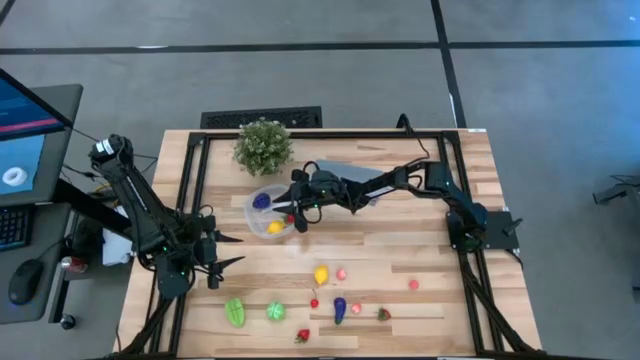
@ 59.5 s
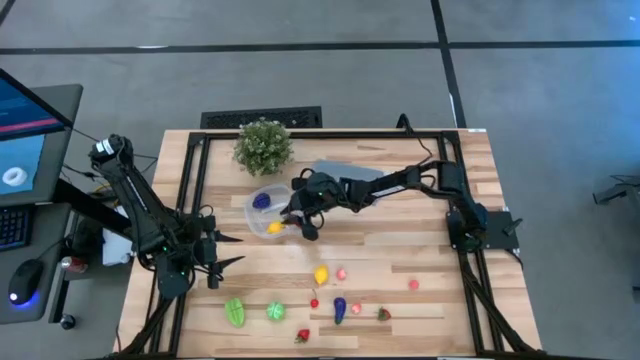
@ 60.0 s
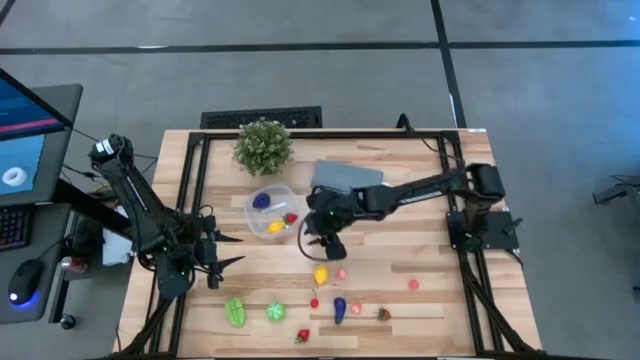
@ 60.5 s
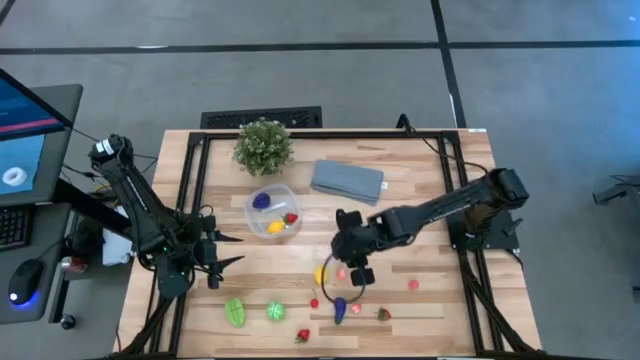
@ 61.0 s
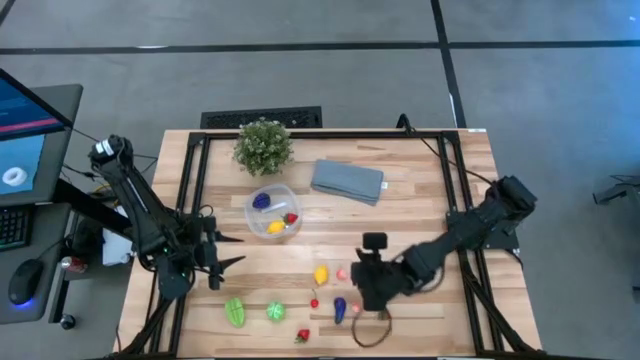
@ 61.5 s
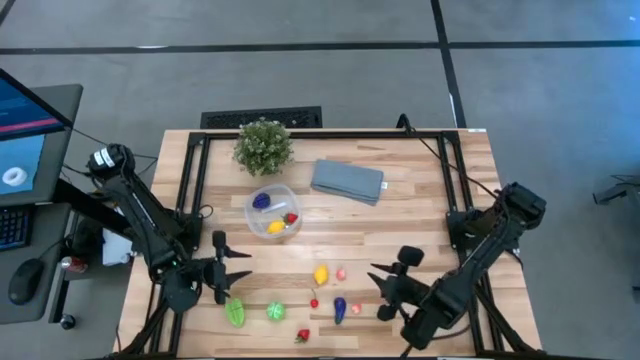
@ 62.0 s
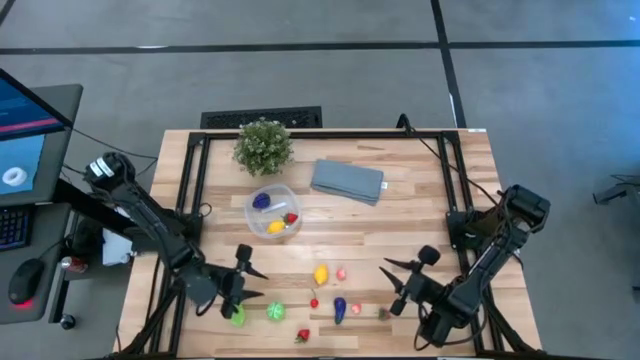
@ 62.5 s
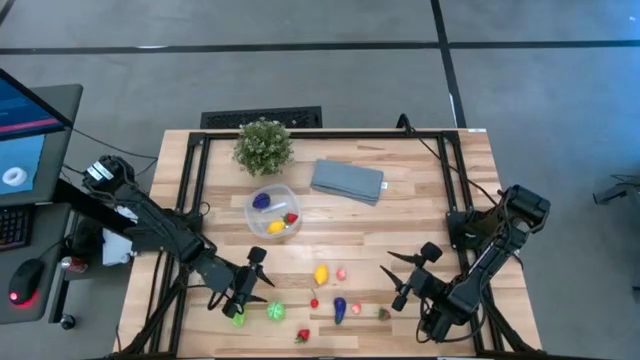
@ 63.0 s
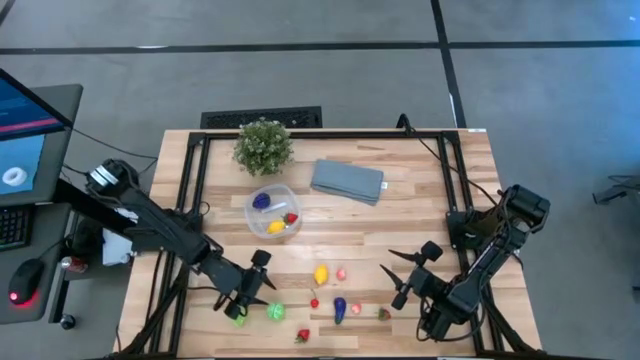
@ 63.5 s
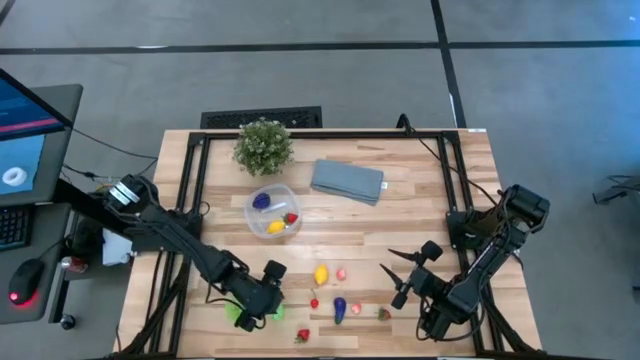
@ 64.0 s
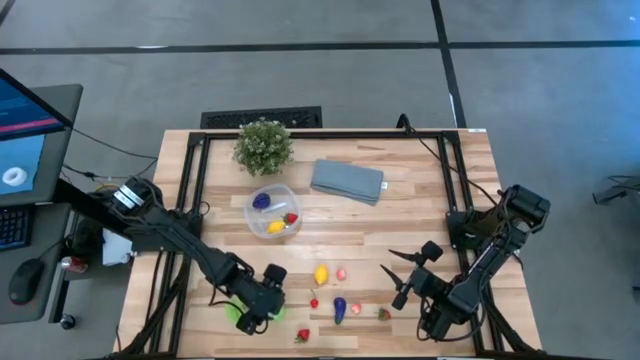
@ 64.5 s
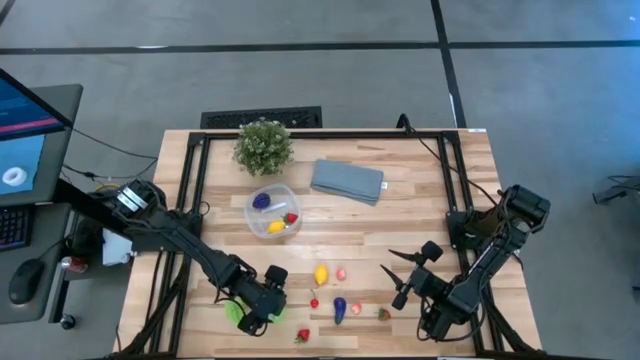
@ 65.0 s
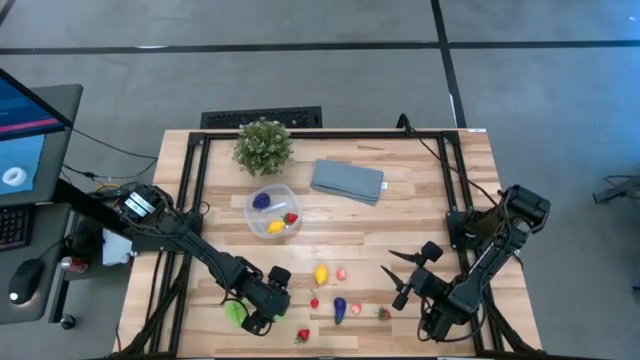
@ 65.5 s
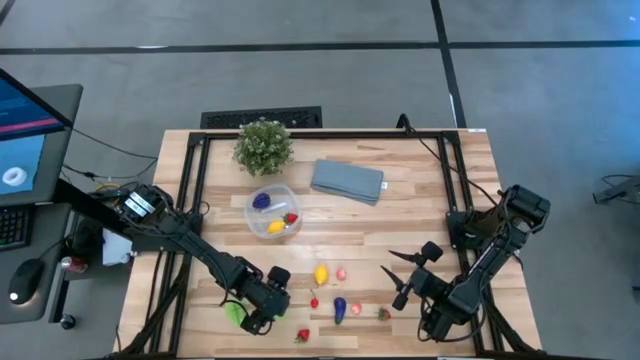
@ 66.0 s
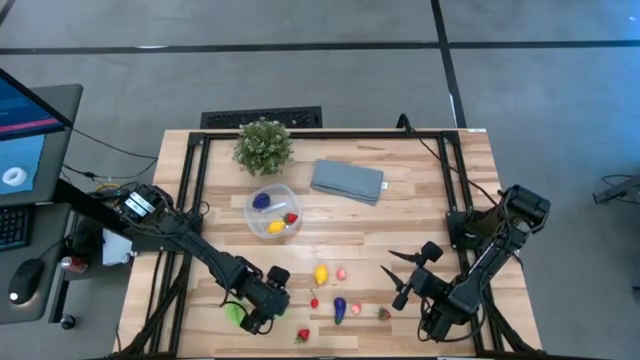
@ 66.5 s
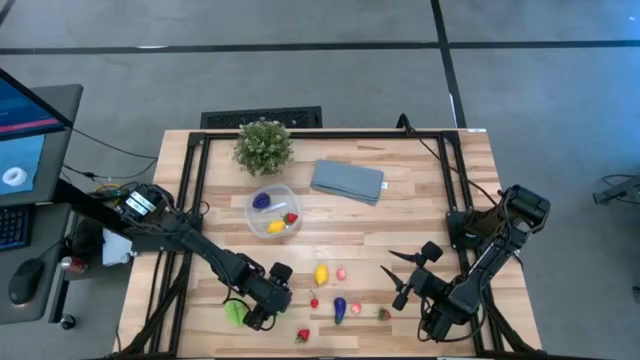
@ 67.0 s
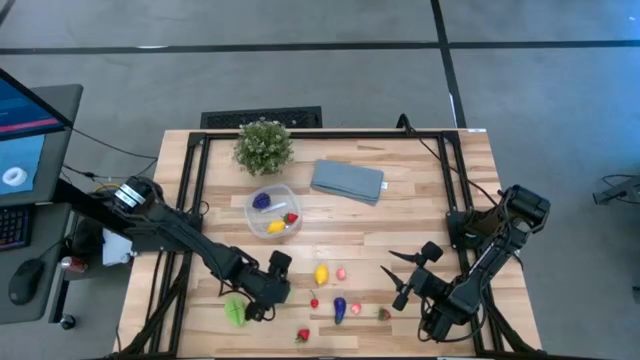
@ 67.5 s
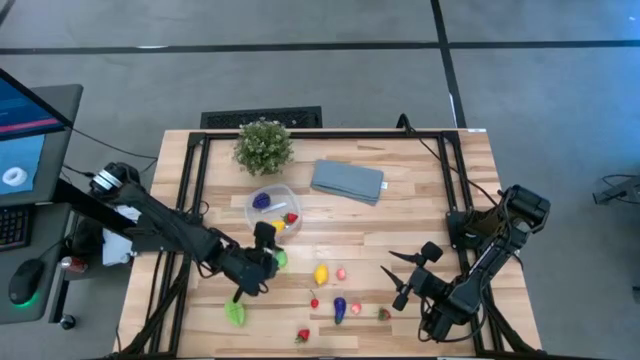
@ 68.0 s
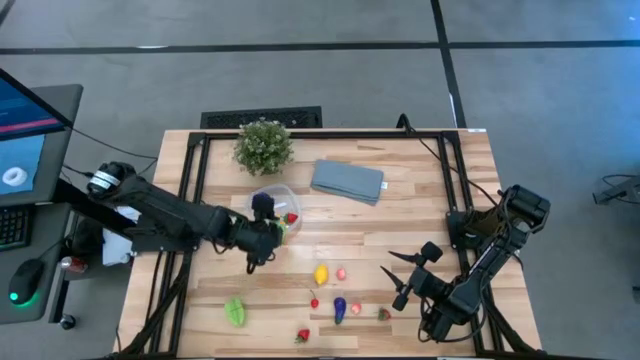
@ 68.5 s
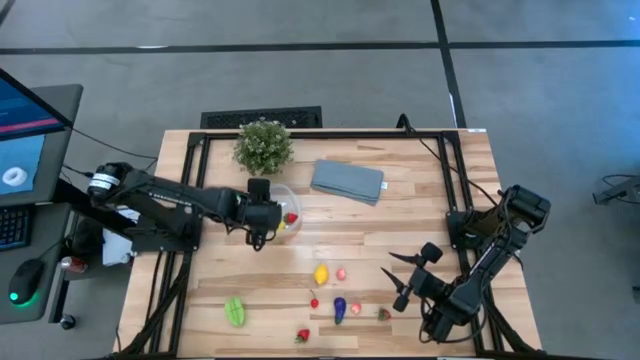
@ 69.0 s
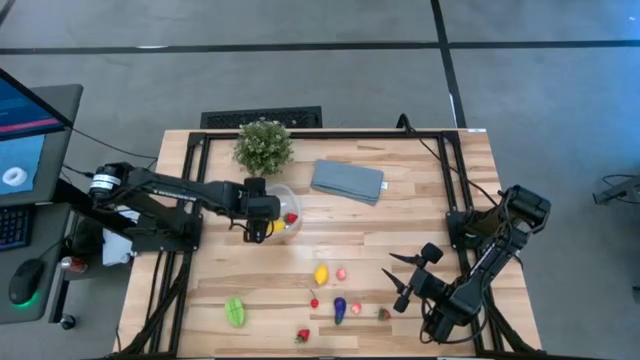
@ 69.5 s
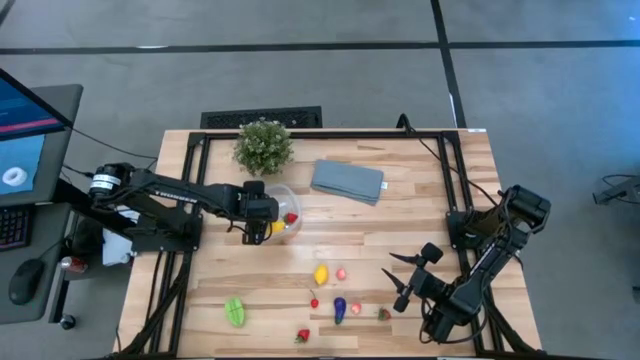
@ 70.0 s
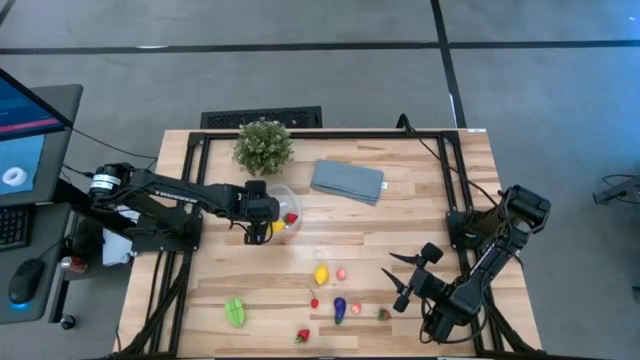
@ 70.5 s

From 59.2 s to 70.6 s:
Task: Pick and placing Produce into tupperware
Put the cabbage into the transparent bin

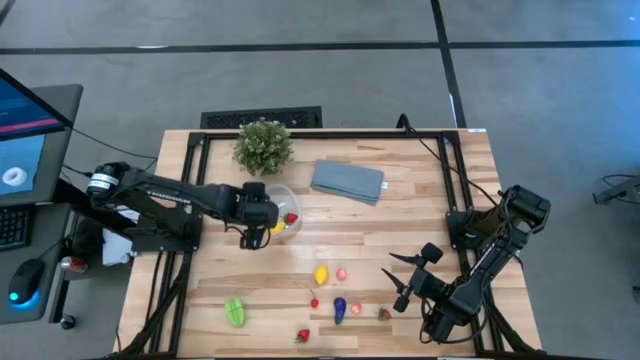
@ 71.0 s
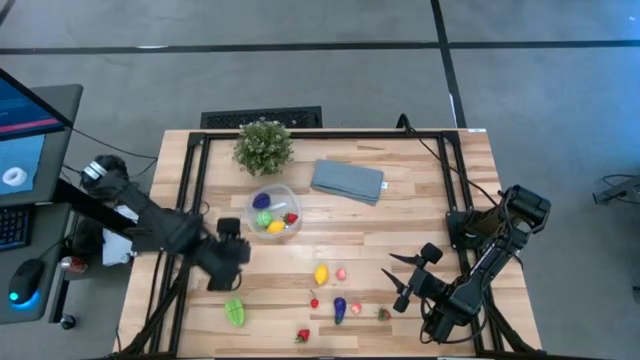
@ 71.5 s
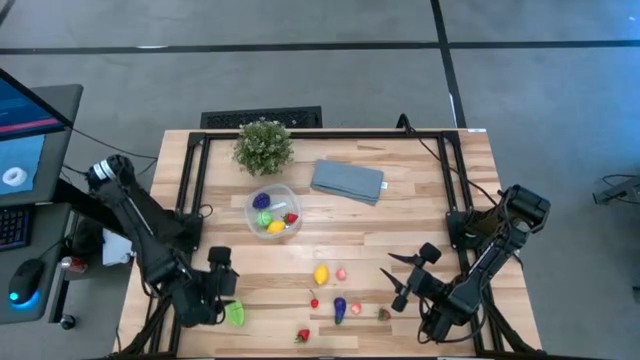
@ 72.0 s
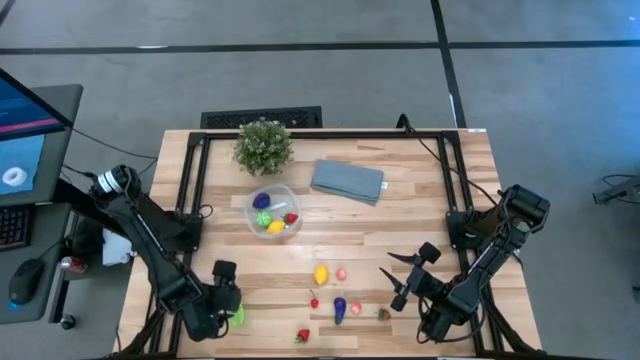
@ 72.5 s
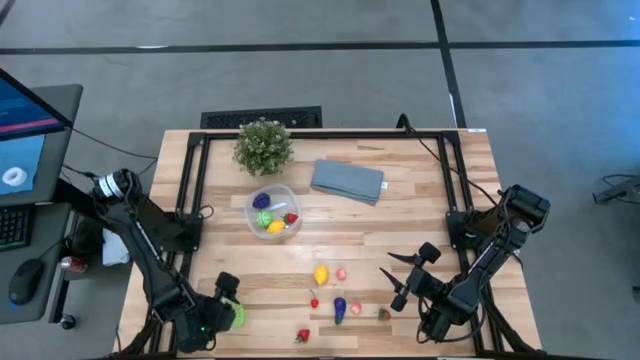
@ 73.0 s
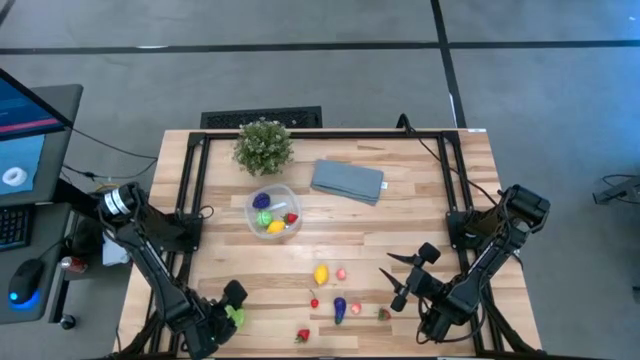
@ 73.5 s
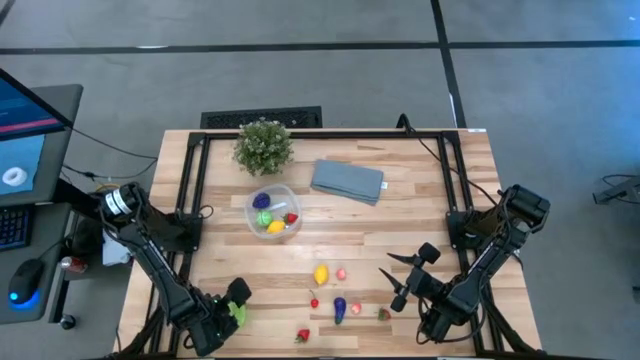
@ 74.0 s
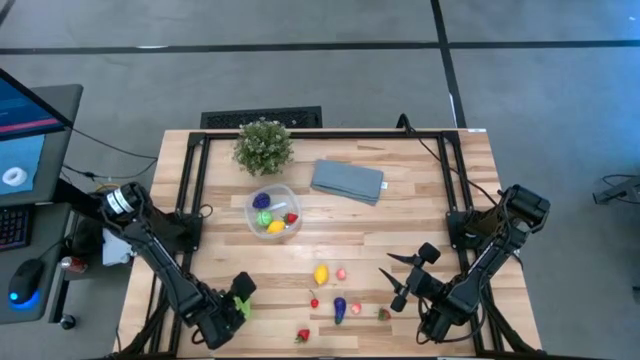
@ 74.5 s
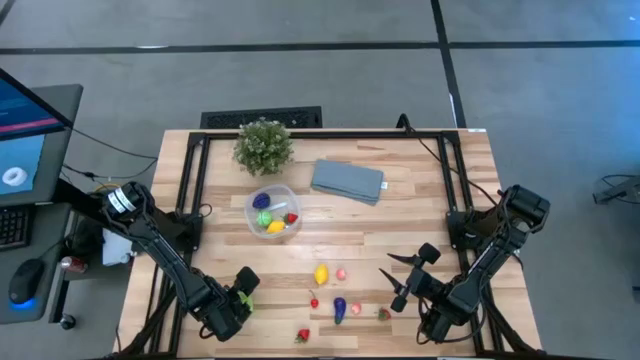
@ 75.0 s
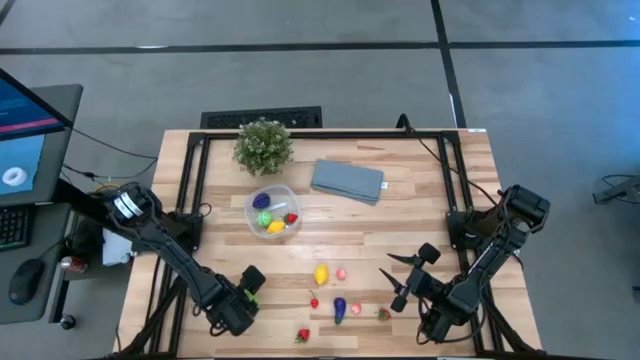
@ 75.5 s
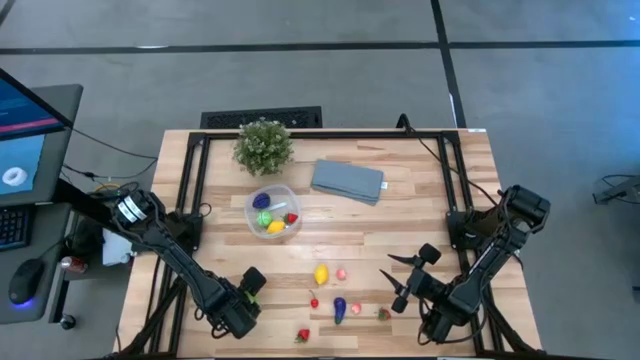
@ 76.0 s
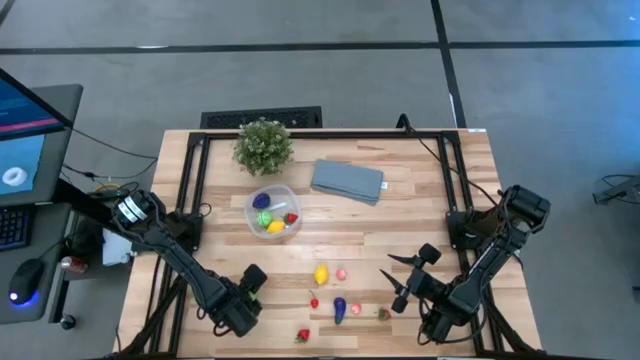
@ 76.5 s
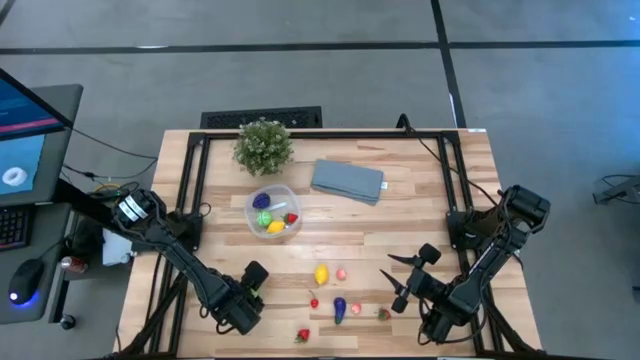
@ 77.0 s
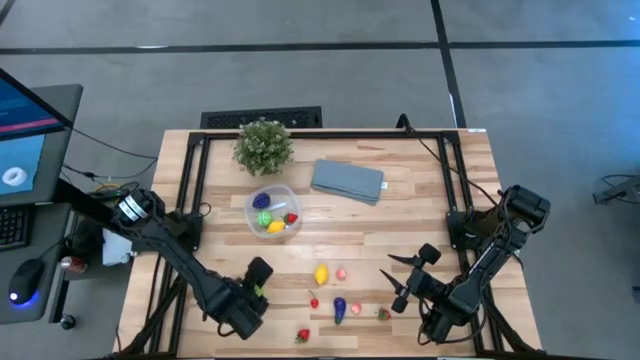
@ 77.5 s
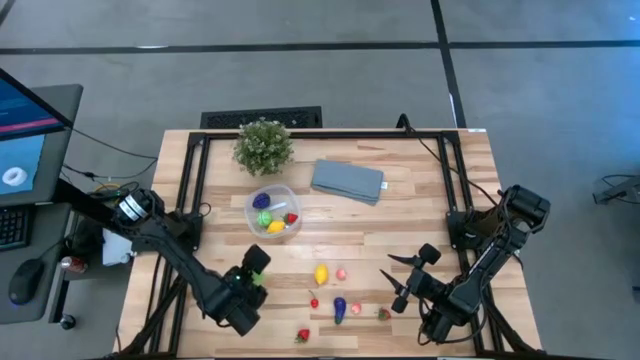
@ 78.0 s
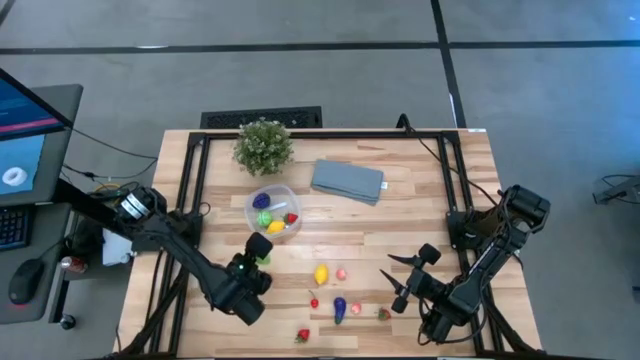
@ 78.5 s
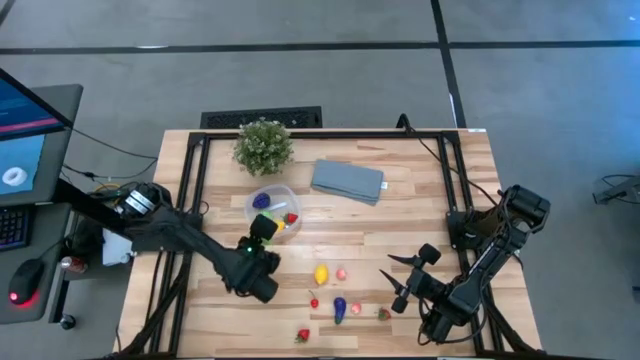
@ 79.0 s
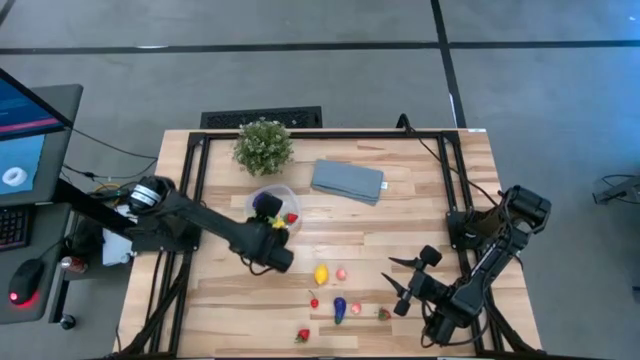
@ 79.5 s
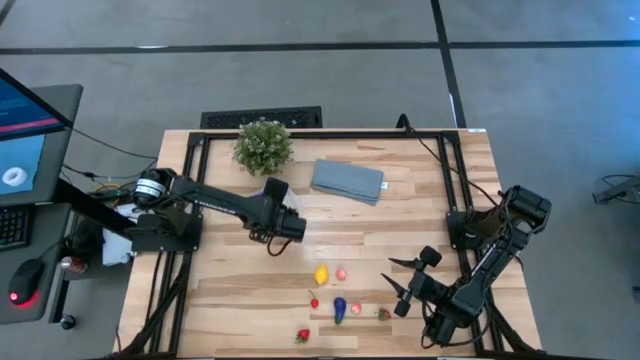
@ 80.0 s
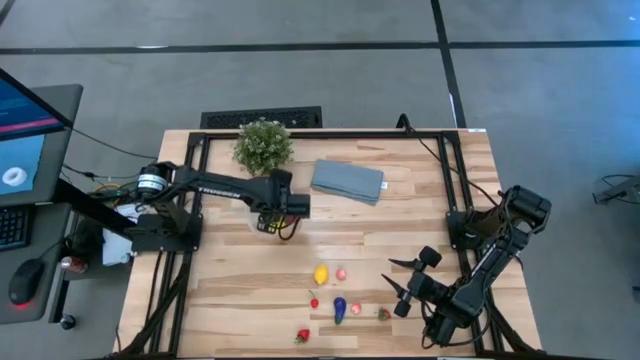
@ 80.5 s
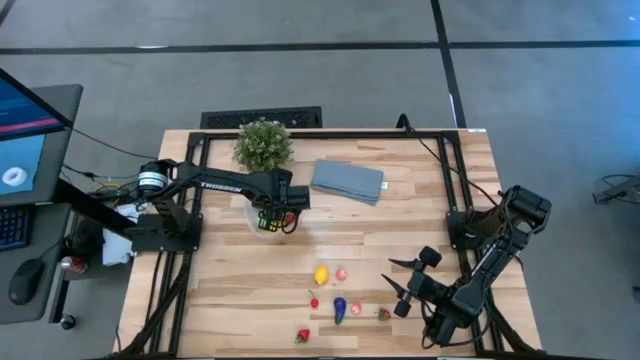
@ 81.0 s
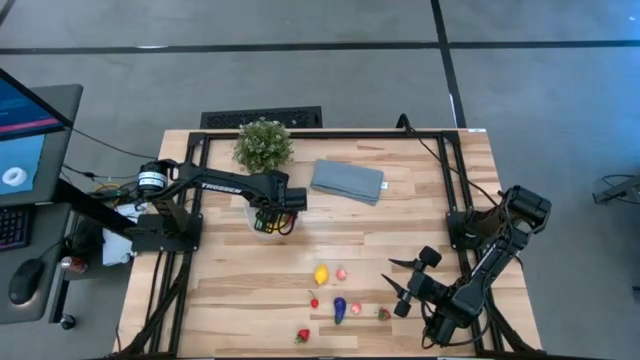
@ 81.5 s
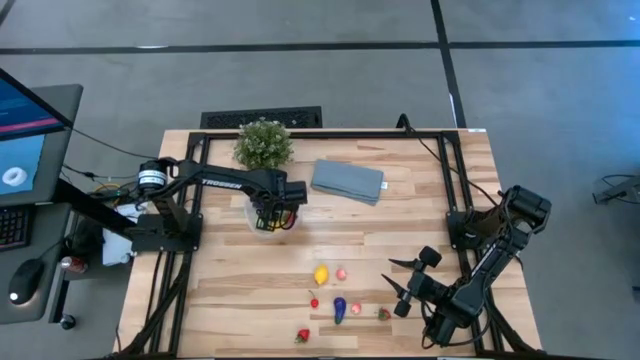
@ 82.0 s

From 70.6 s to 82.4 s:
Put the light green star fruit into the transparent bin
